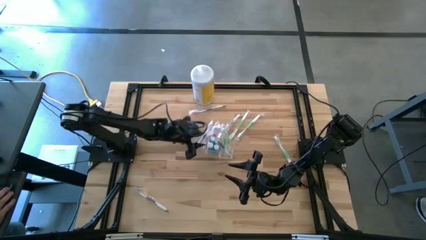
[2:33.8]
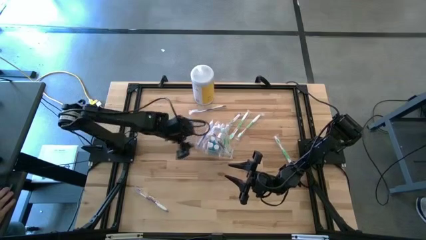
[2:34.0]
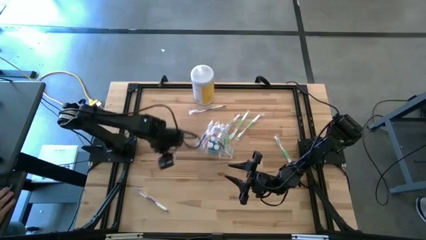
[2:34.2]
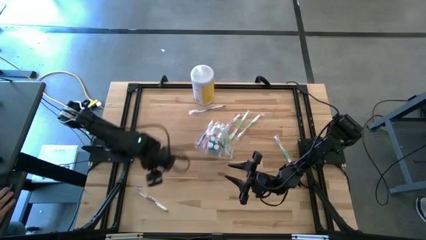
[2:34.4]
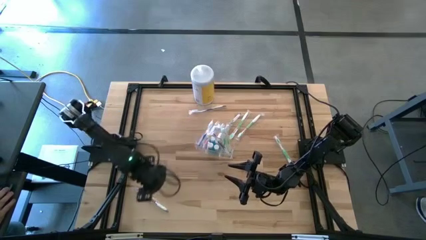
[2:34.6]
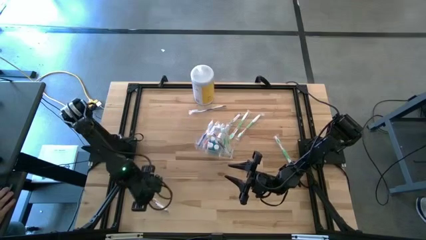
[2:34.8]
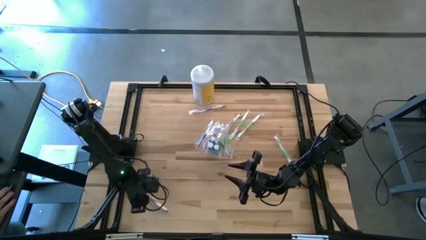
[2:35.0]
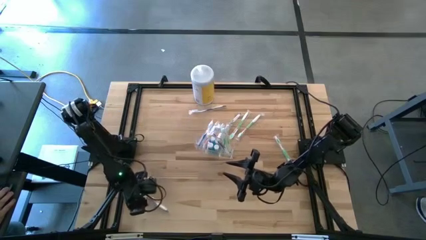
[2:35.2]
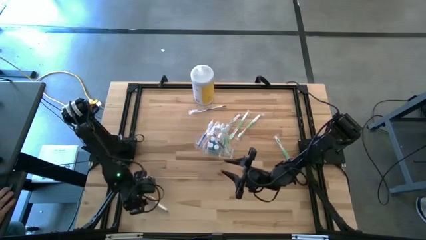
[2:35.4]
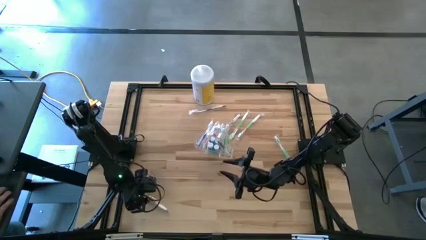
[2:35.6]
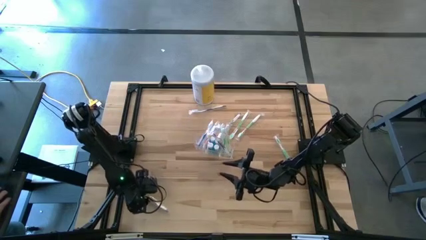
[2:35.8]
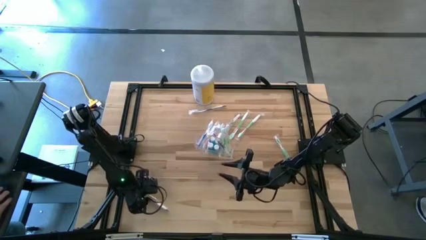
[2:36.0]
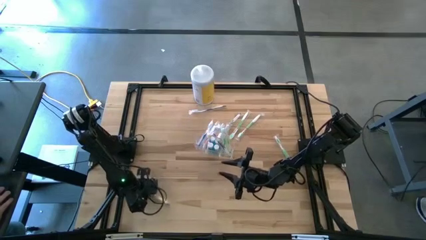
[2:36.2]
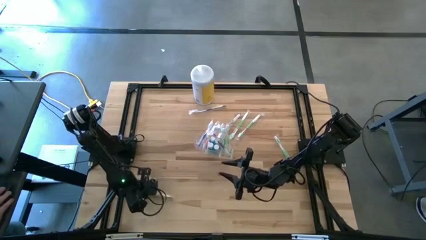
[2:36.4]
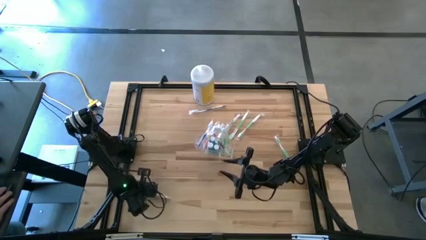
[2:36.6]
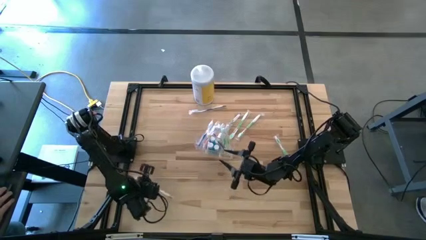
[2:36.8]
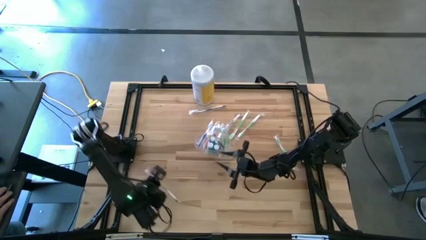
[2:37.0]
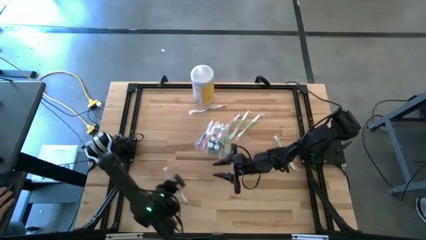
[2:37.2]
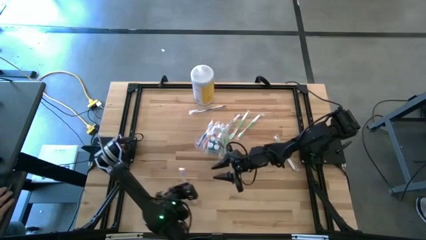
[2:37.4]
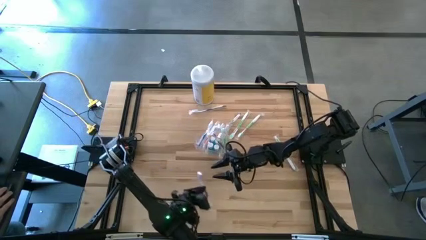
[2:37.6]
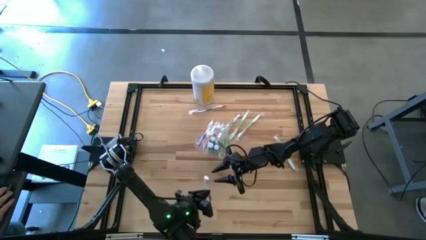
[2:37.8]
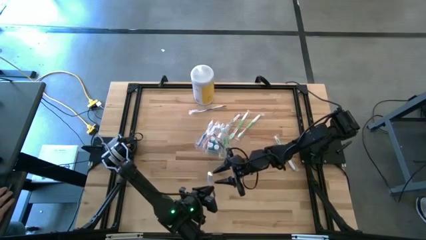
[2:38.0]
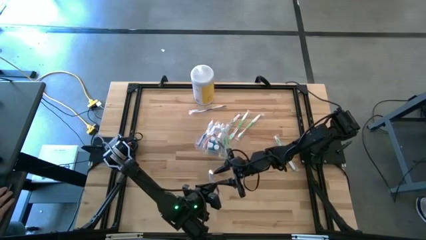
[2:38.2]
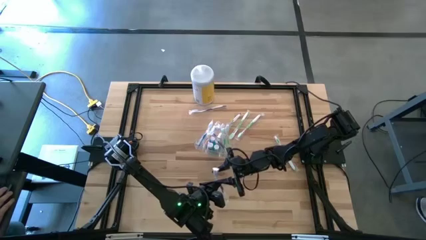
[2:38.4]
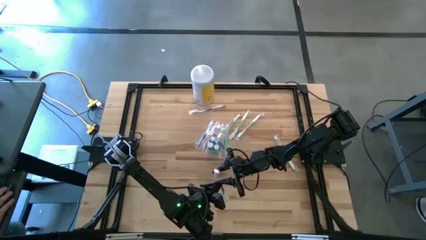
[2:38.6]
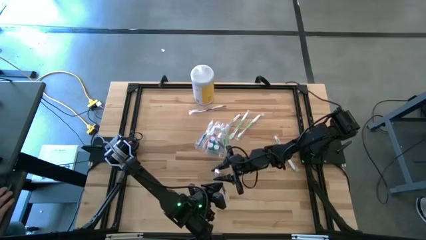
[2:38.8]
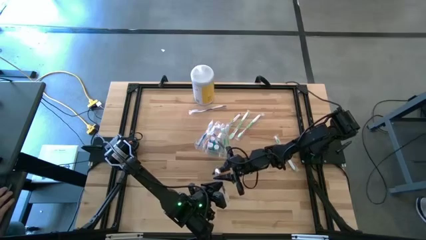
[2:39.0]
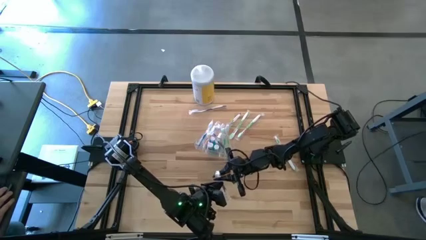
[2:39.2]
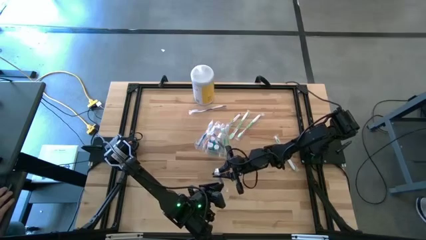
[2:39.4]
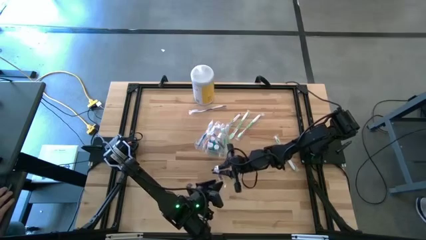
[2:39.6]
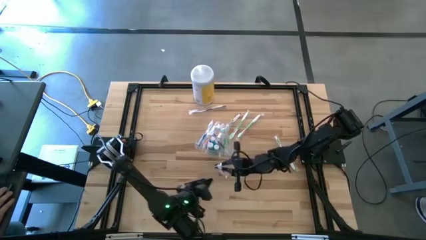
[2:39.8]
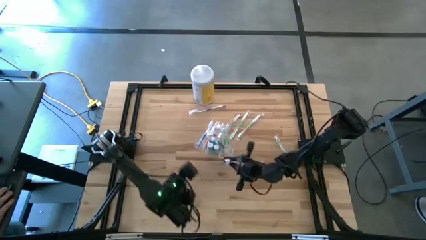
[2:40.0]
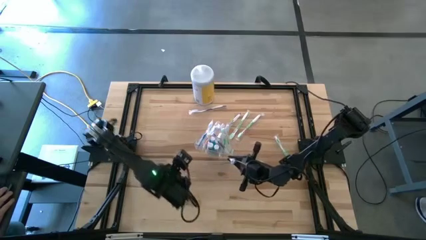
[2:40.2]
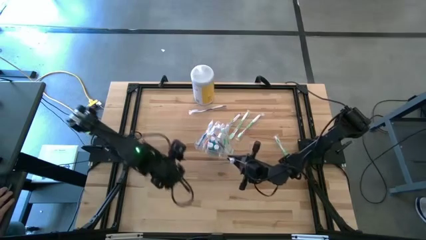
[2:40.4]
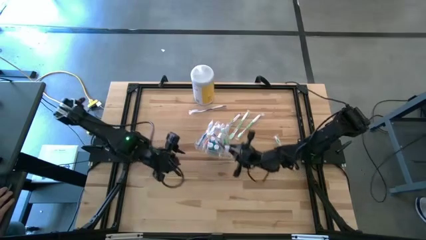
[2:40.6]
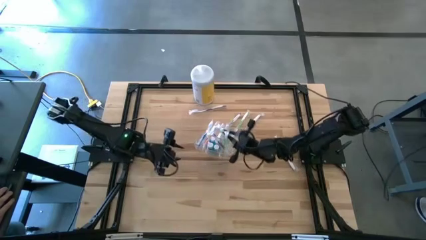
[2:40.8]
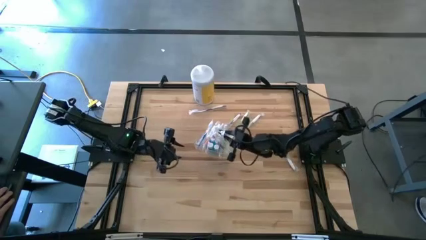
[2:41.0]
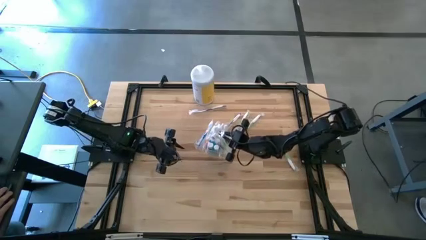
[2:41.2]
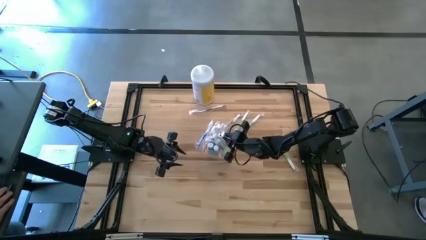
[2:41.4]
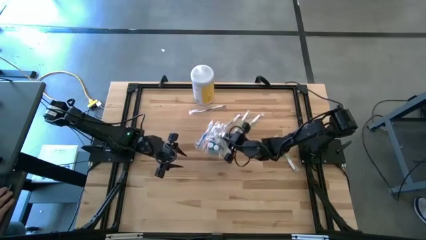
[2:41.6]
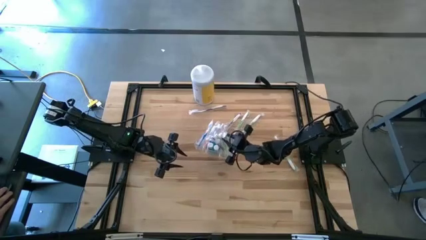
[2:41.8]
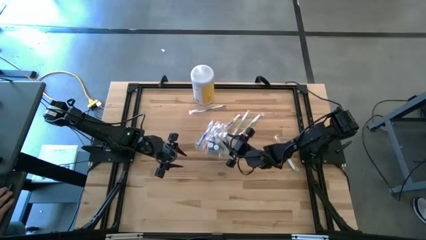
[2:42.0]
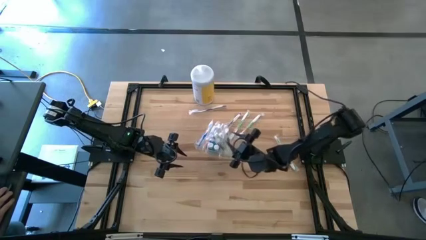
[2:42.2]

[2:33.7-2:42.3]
Task: Pick & Place toothbrushing station
Put the violet toothbrush into the transparent organizer

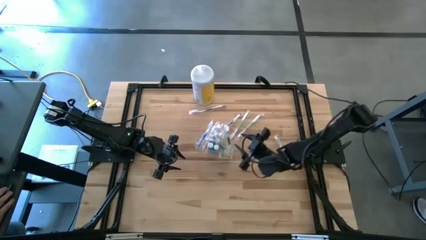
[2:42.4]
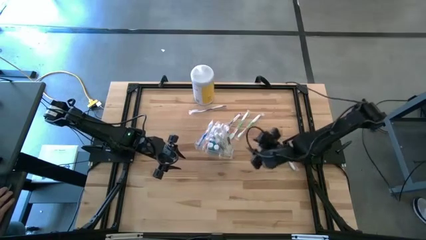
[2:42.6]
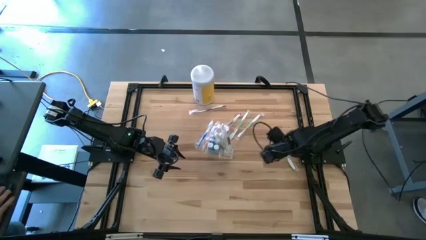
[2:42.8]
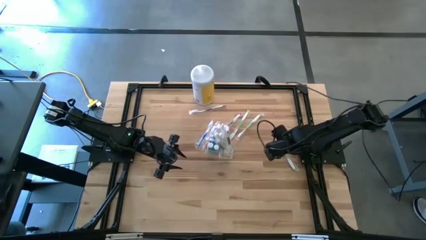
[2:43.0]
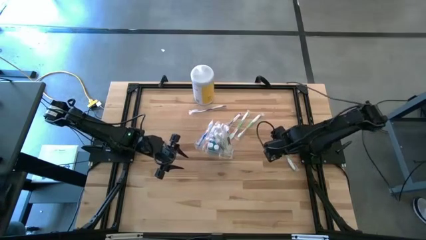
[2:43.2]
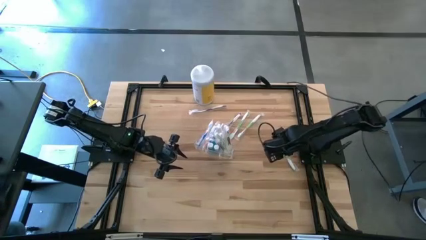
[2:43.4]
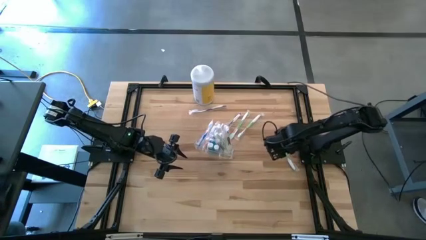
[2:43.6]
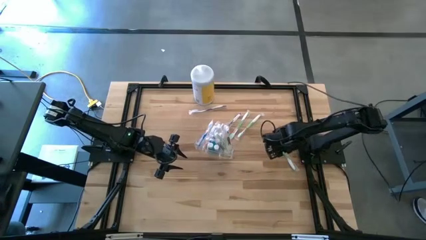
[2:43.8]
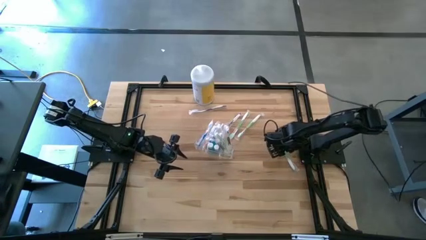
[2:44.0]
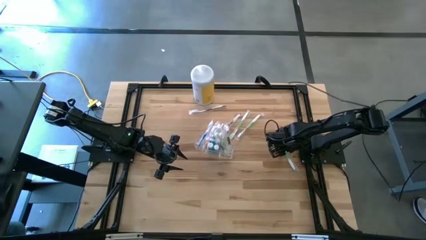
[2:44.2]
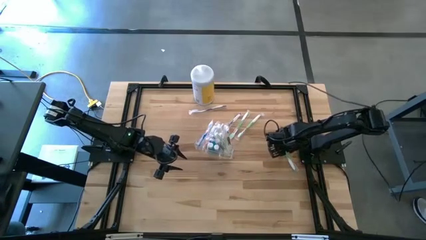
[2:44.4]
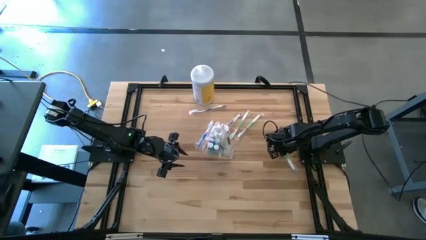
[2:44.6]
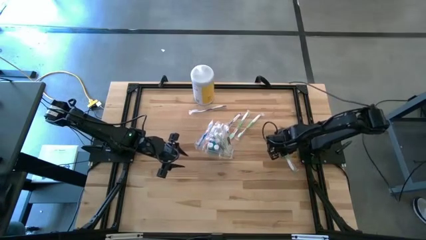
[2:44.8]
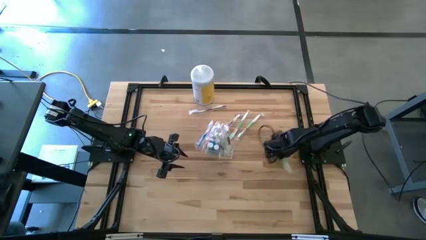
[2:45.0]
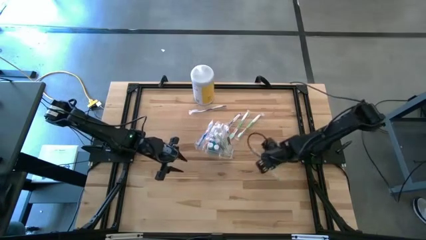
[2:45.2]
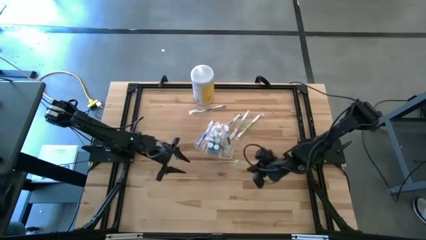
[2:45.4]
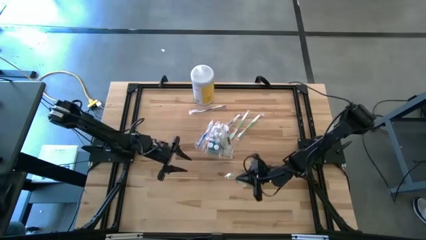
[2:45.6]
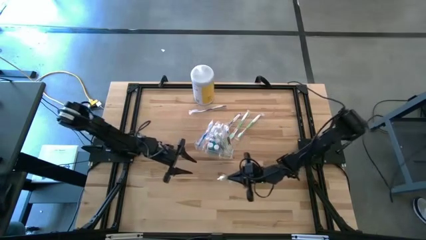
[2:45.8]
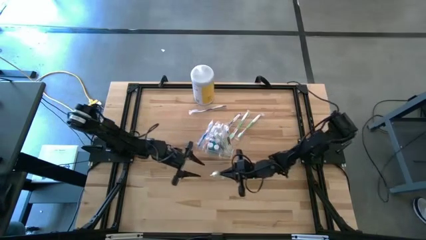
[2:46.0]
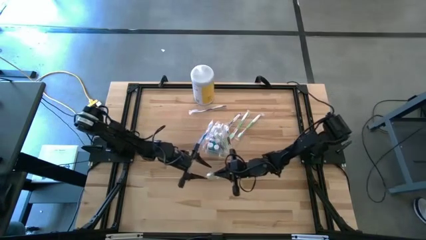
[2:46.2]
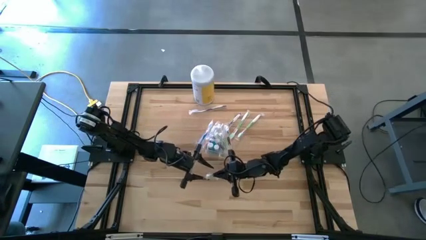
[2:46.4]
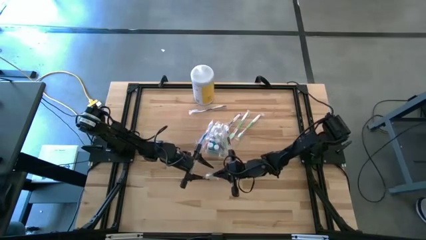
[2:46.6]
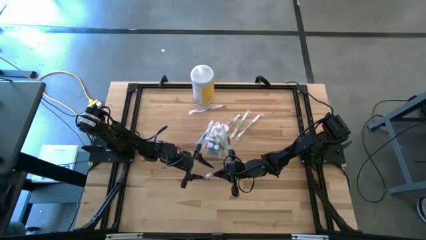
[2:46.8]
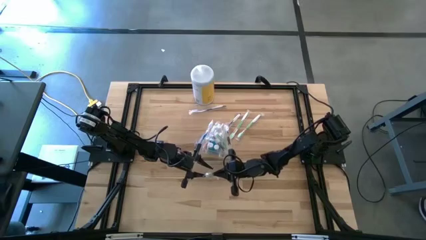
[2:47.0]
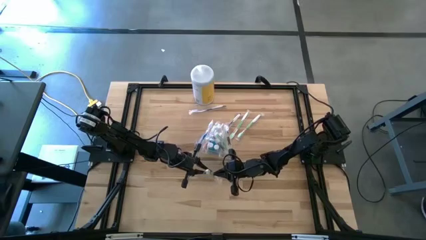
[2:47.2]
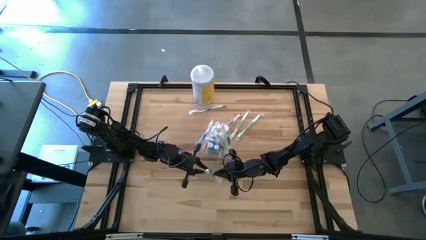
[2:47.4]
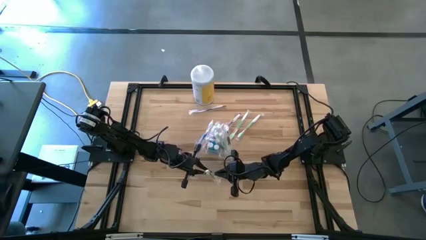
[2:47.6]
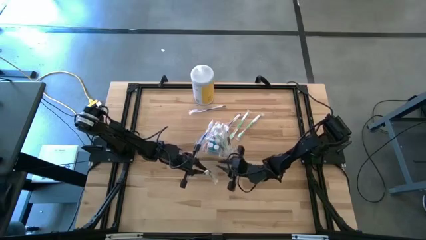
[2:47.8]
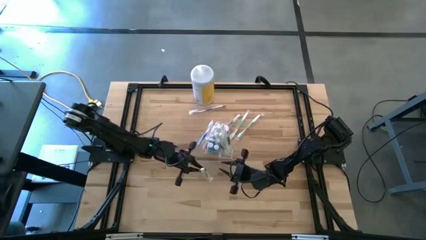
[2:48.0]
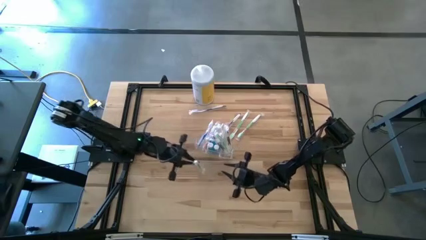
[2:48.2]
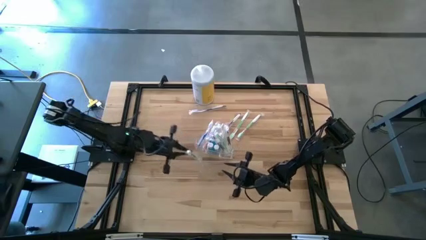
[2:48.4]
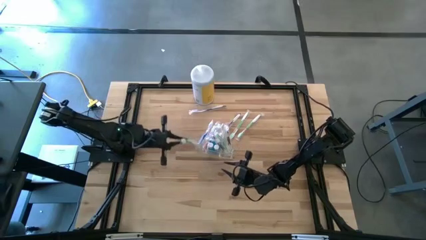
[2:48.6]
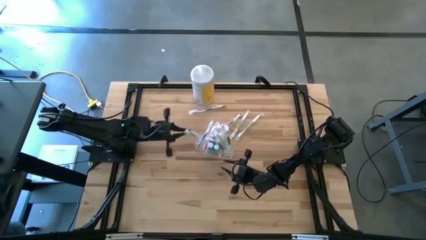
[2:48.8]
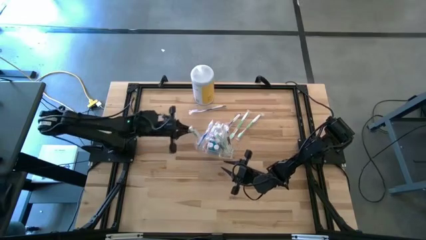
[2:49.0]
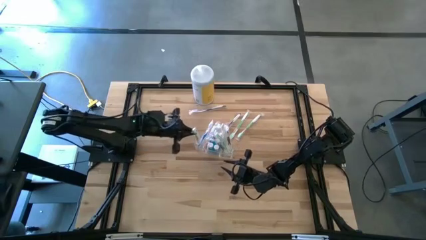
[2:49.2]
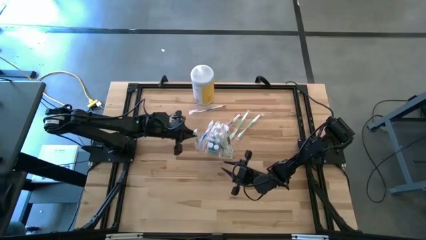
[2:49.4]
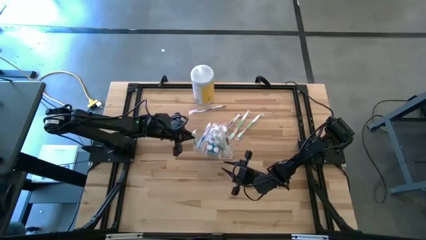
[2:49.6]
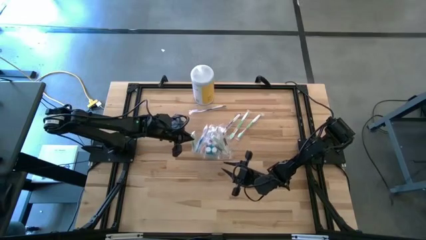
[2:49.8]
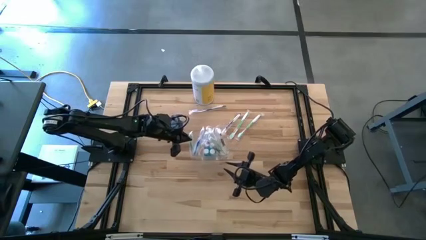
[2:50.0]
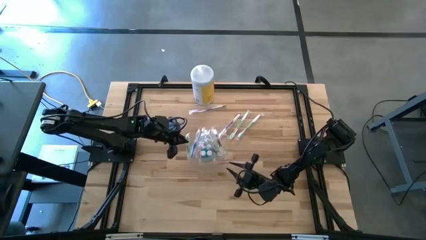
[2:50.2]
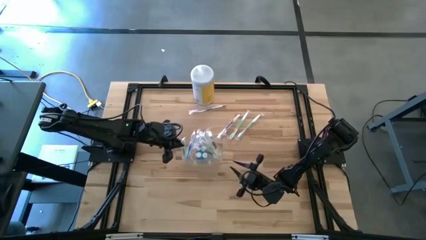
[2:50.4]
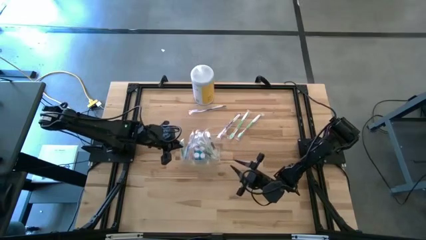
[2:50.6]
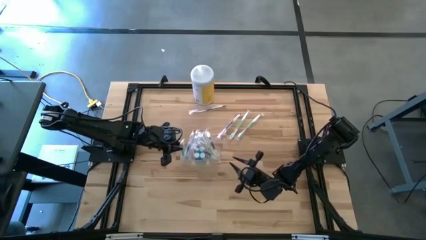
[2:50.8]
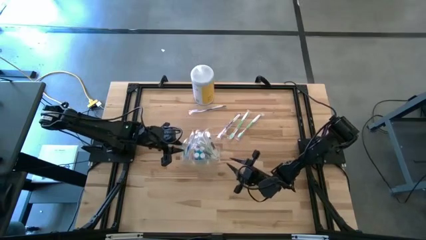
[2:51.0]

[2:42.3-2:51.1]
Put the green toothbrush into the transparent organizer
